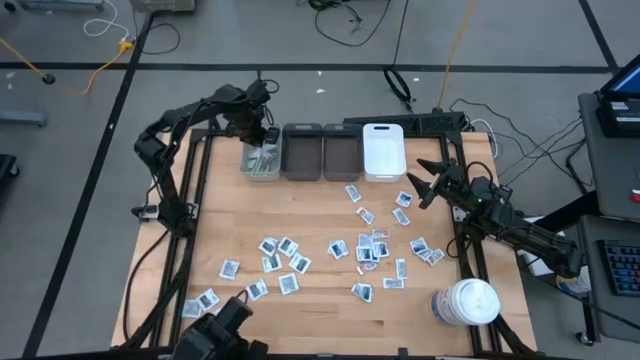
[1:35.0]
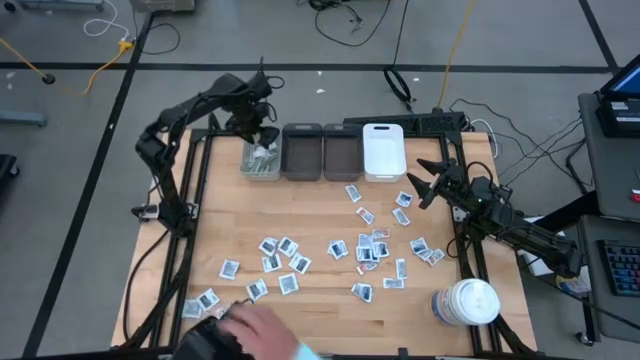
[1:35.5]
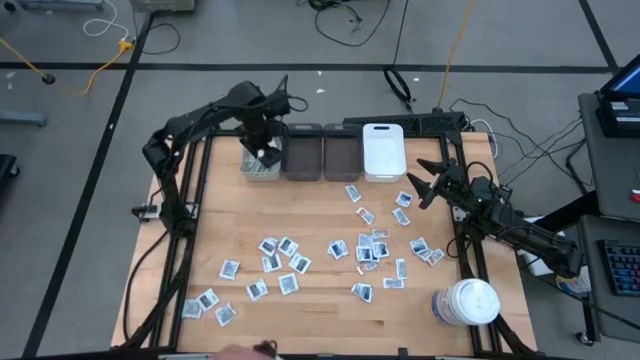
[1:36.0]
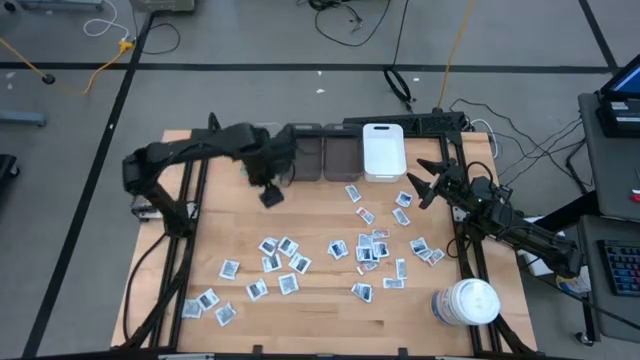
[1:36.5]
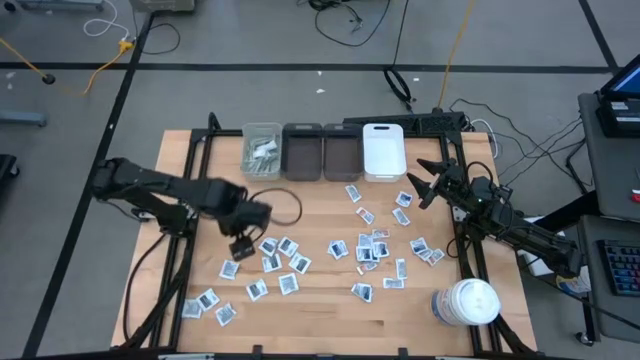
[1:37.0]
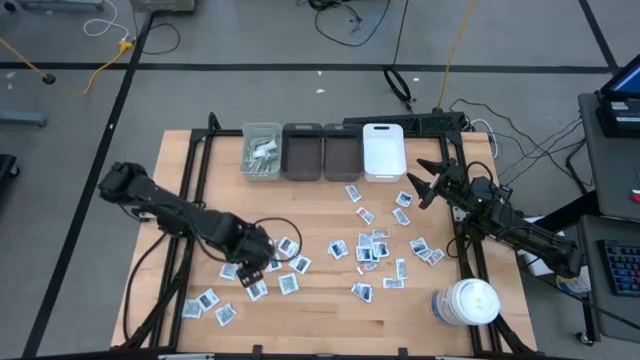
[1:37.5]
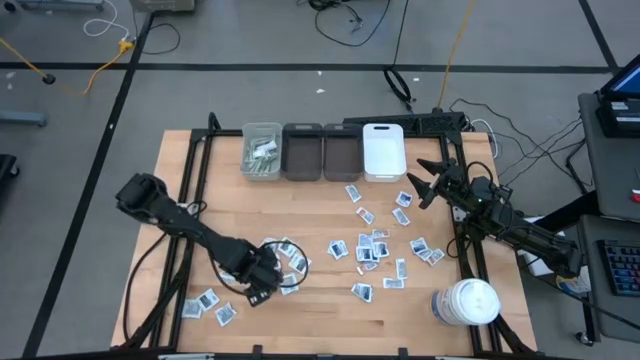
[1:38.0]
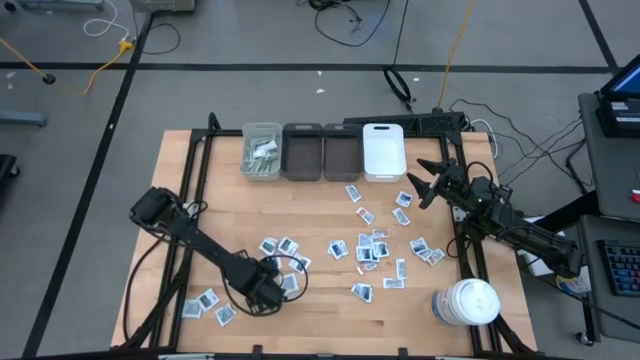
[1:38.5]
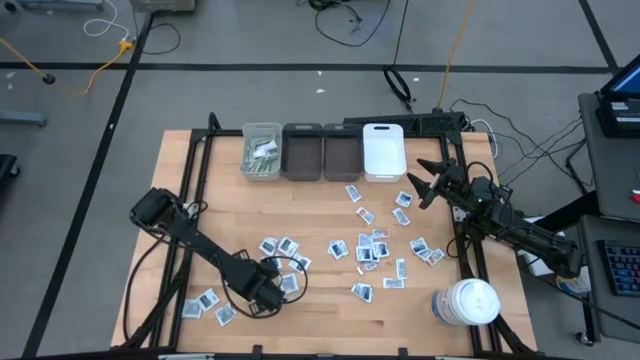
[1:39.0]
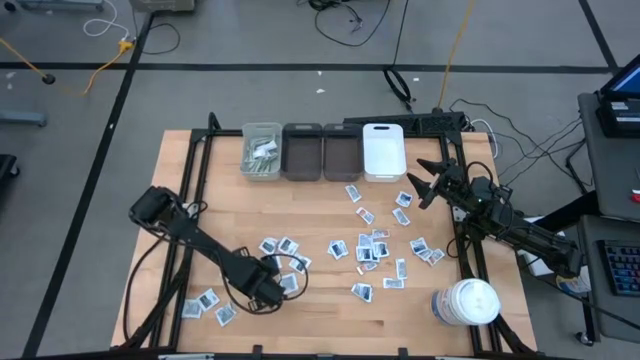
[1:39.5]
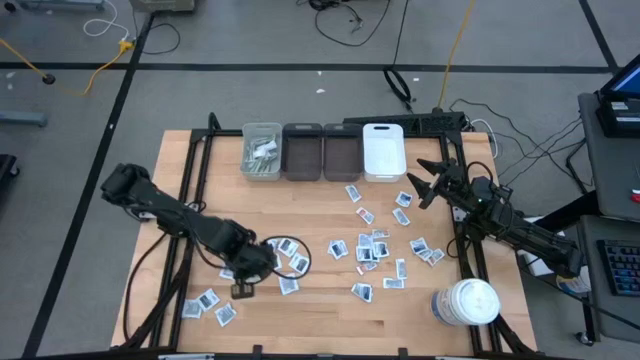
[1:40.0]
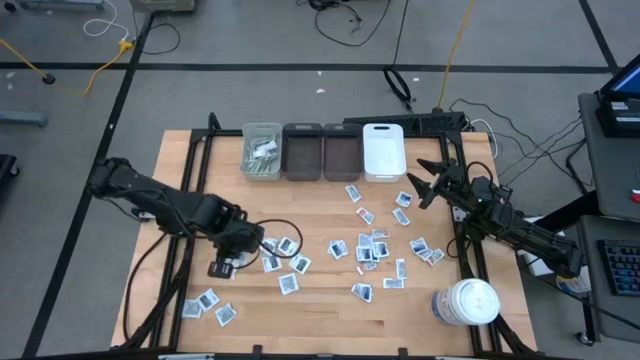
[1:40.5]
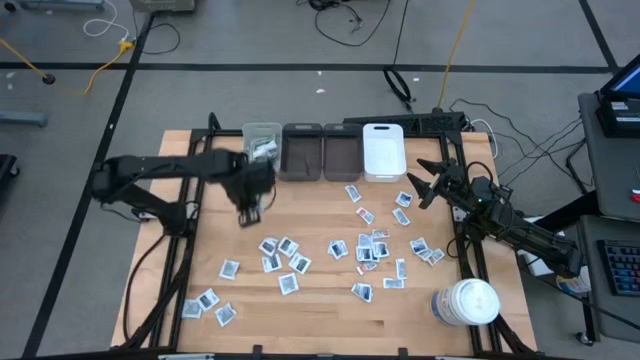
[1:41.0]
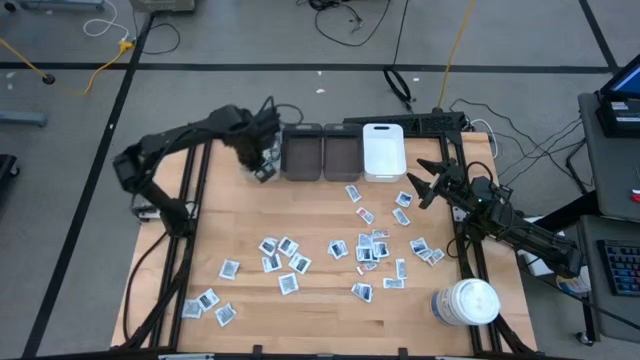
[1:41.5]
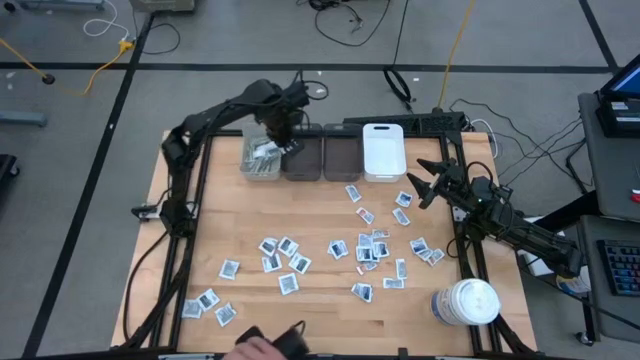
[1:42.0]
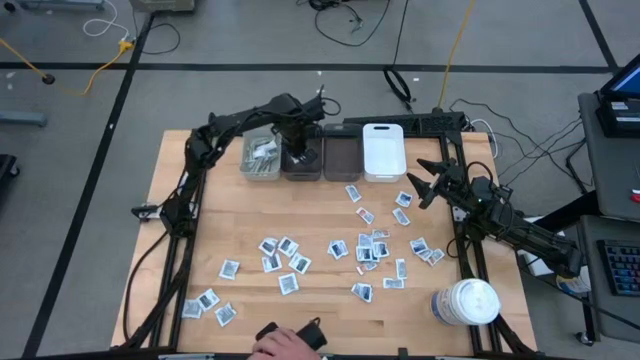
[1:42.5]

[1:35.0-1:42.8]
Task: Pick & Place First Aid Supplies
Put the towelette pack into the left black bin

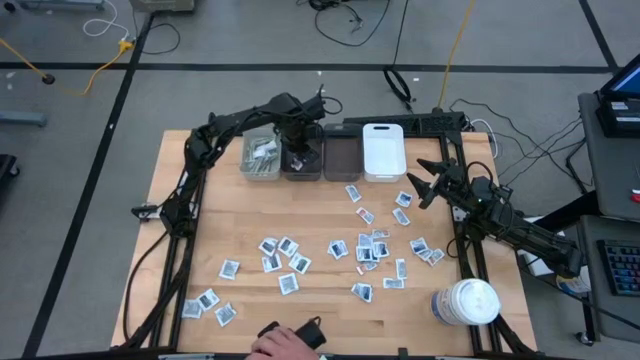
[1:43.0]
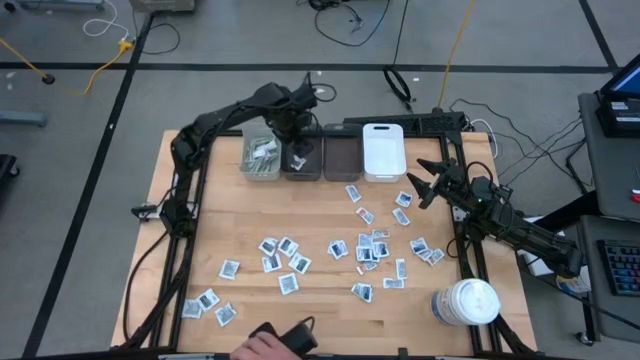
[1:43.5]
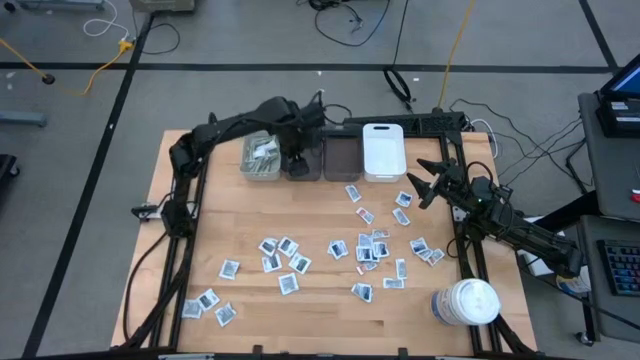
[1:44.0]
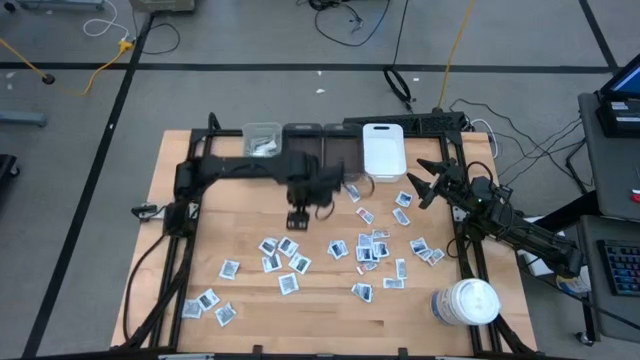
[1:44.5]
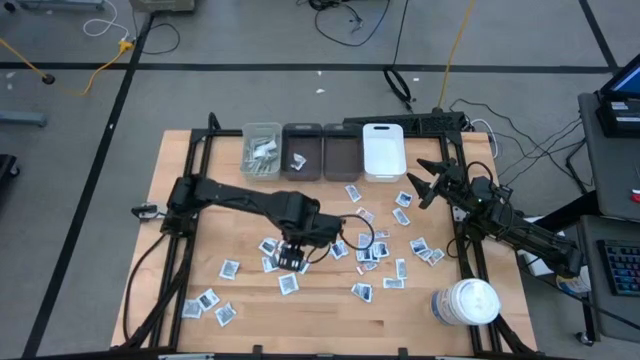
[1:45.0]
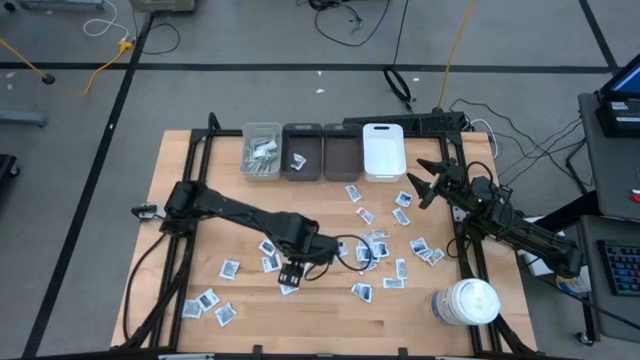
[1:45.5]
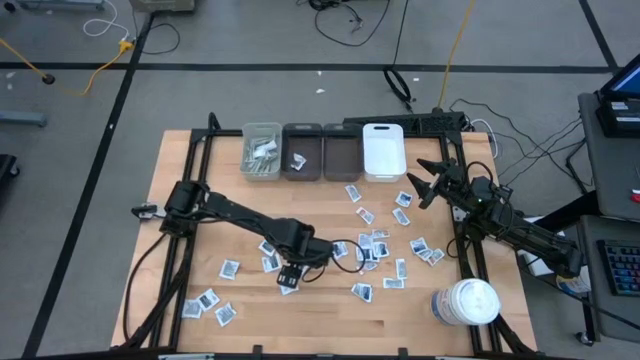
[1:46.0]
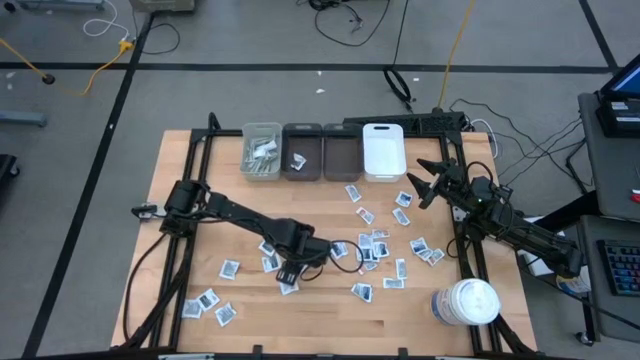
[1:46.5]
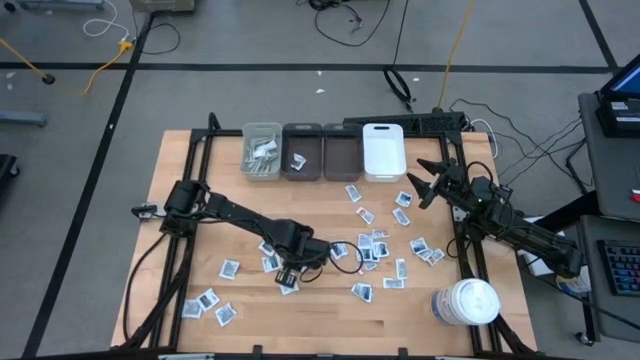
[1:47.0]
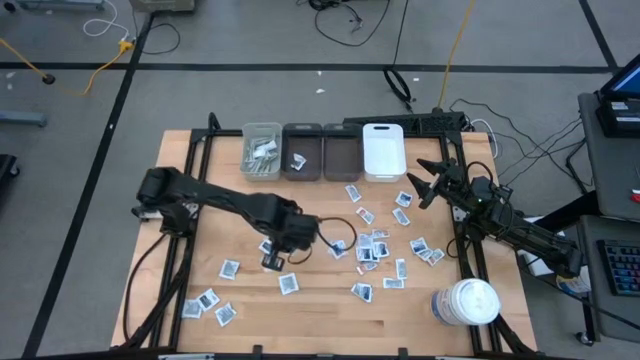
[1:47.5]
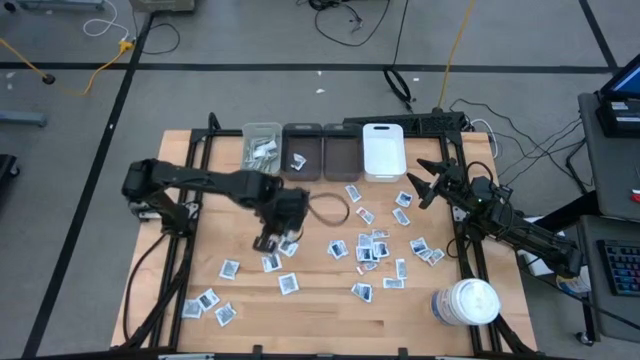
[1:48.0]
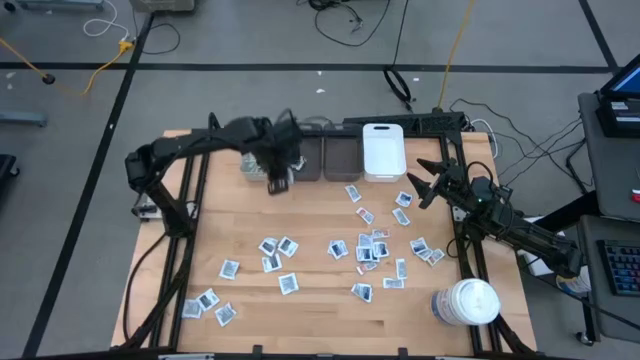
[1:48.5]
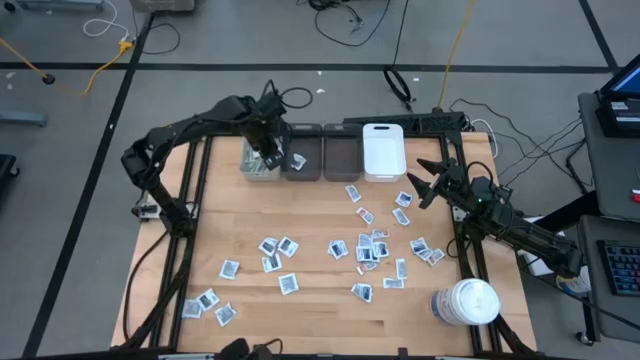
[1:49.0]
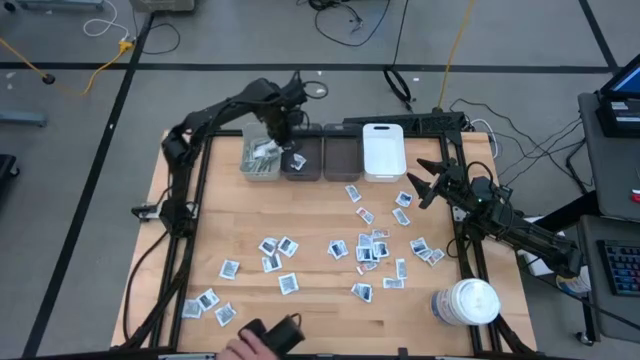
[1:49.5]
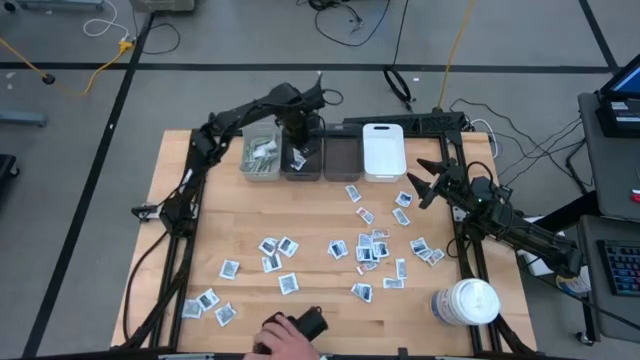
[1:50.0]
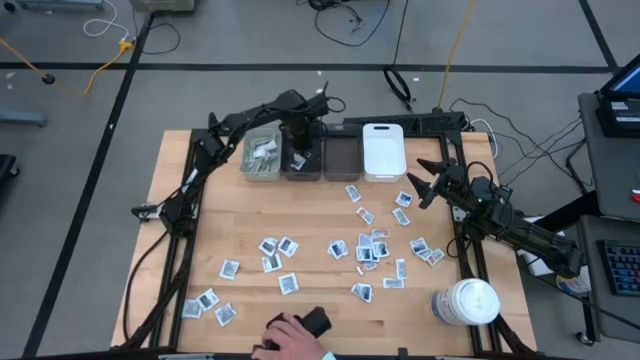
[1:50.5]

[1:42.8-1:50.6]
Put the towelette pack into the left black bin

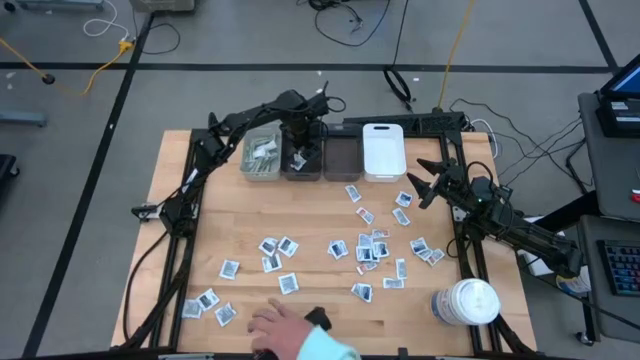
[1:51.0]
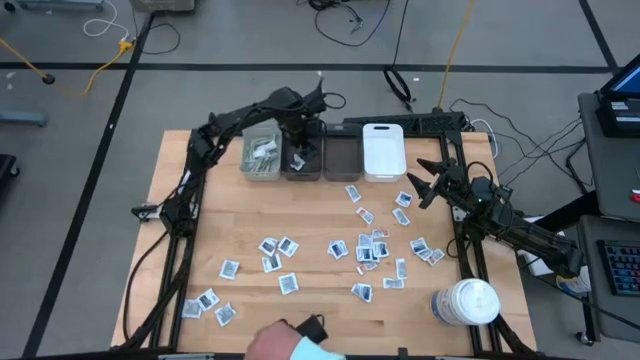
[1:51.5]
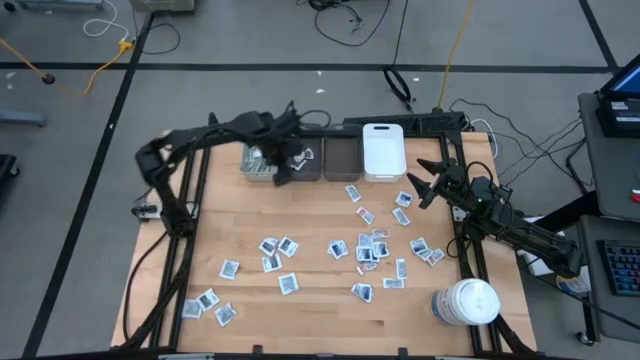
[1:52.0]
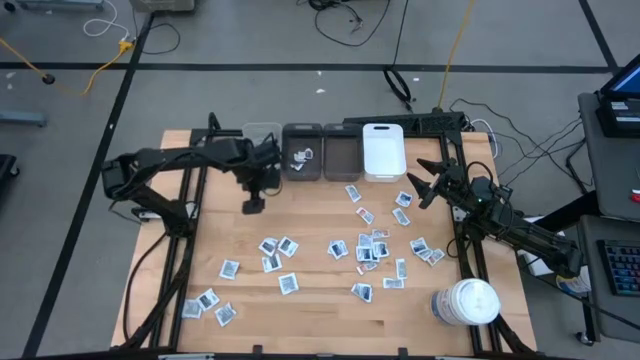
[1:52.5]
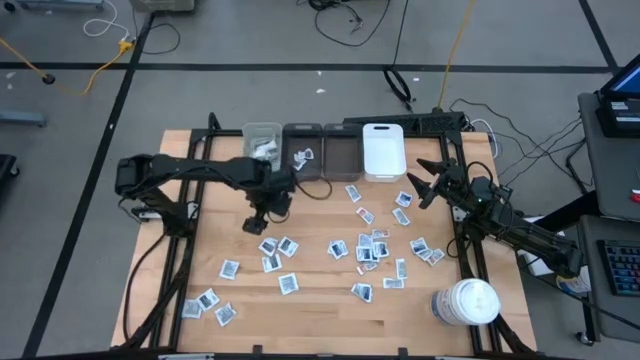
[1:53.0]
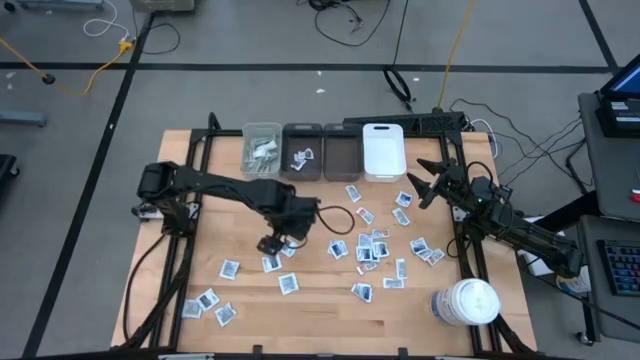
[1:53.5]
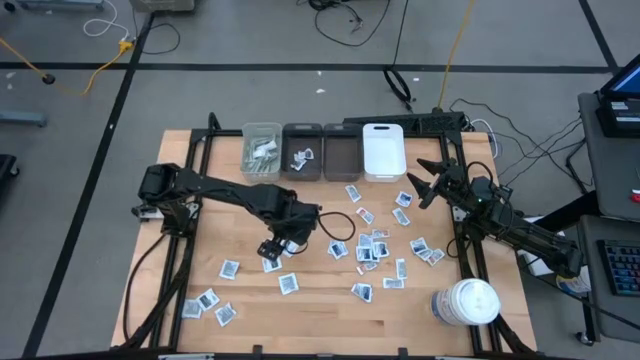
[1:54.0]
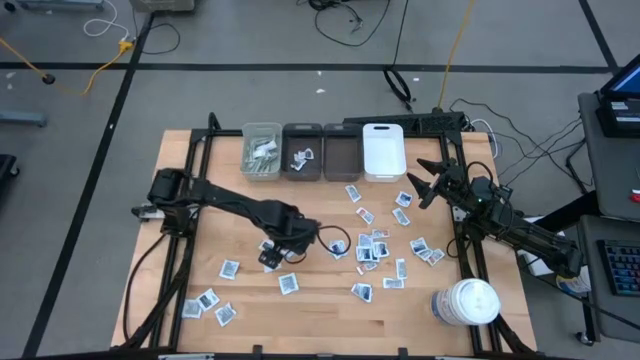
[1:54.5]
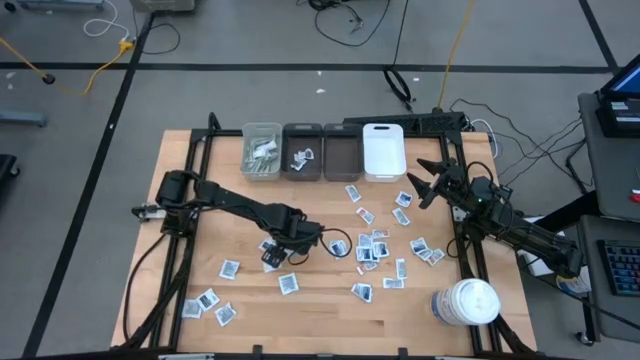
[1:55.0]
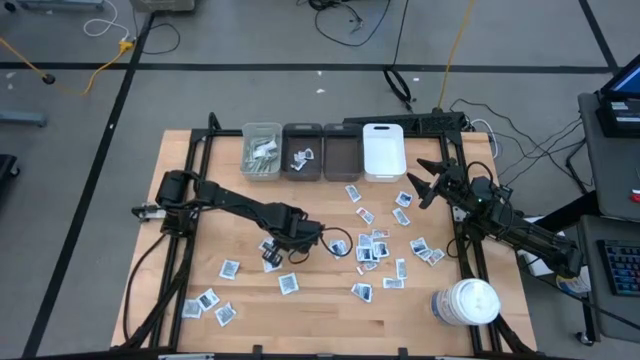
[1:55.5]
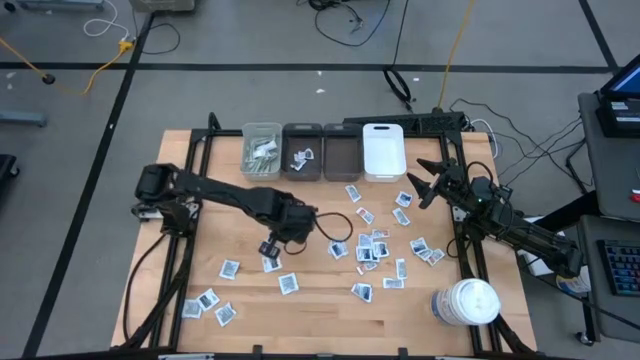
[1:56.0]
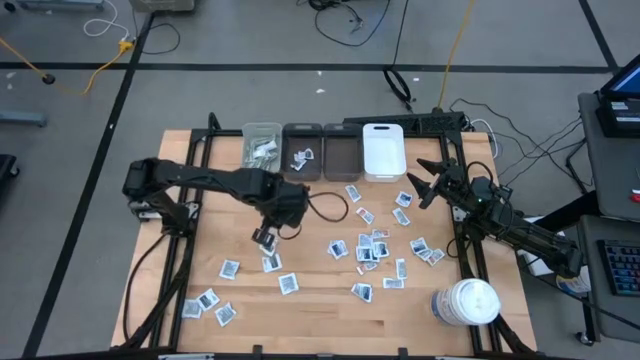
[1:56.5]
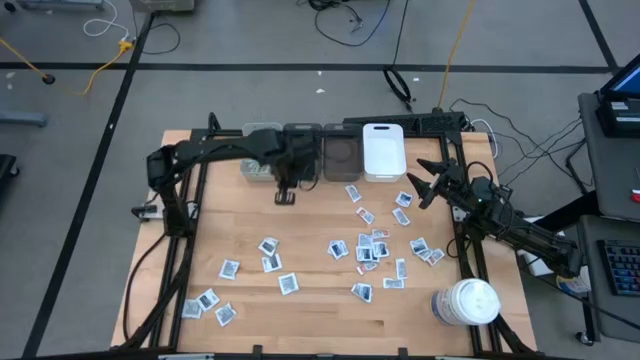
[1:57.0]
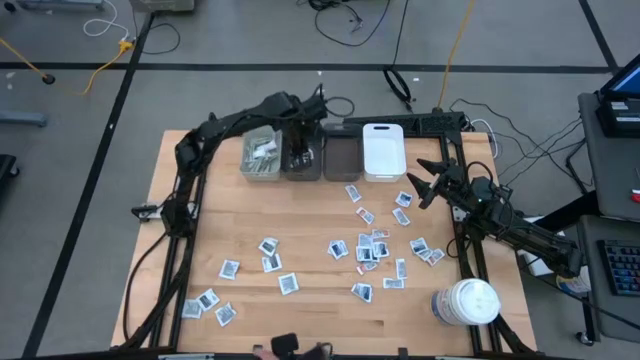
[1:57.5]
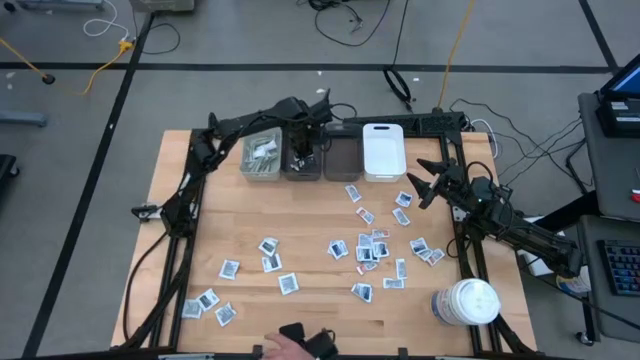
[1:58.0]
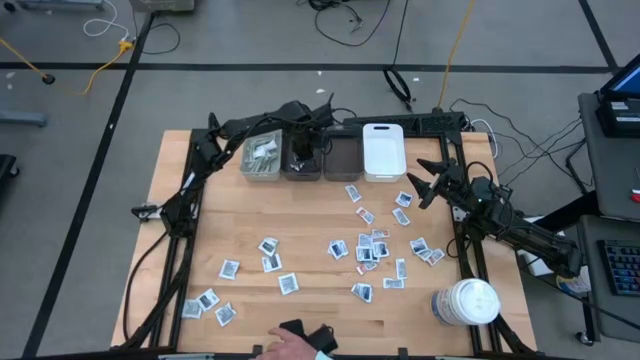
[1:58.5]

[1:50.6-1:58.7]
Put the towelette pack into the left black bin
